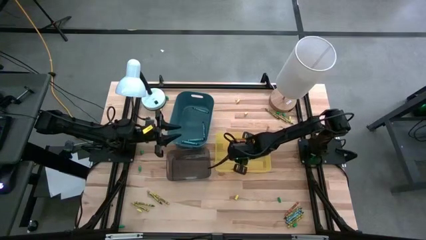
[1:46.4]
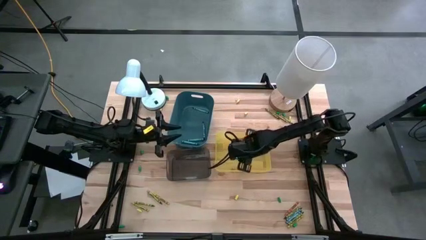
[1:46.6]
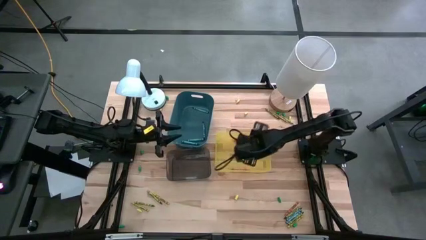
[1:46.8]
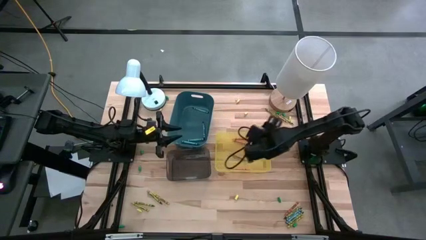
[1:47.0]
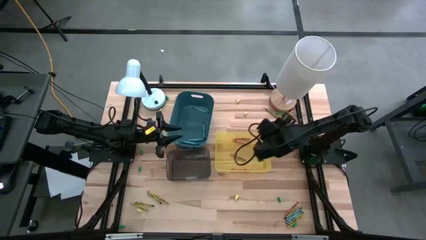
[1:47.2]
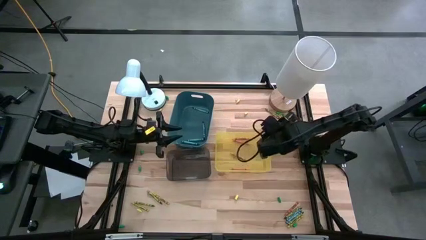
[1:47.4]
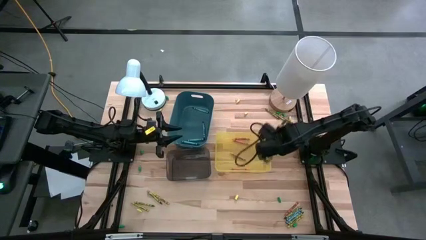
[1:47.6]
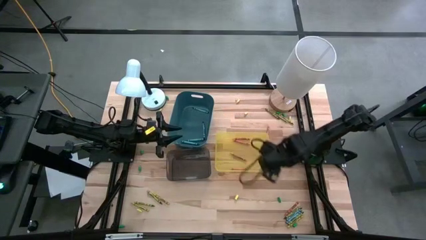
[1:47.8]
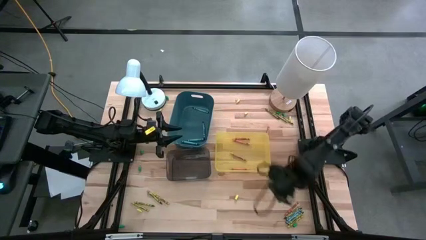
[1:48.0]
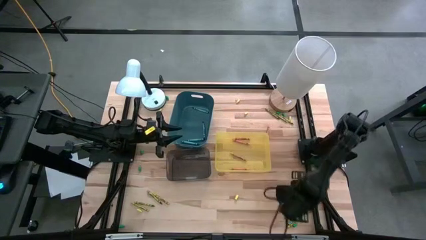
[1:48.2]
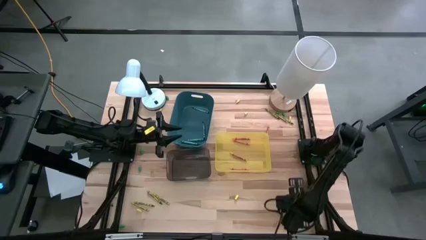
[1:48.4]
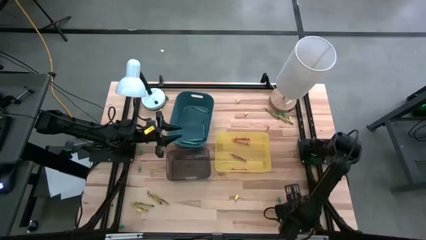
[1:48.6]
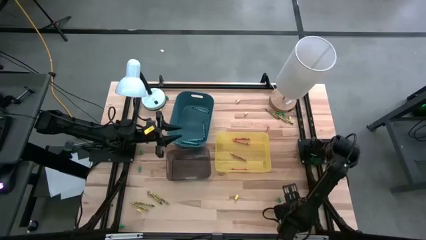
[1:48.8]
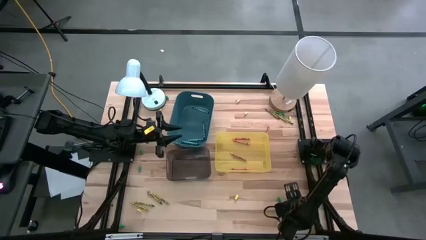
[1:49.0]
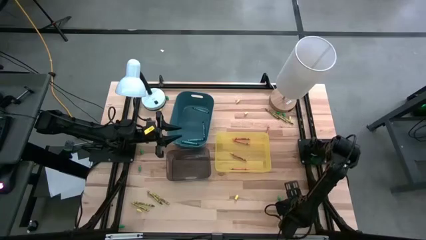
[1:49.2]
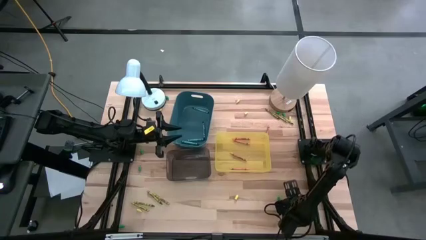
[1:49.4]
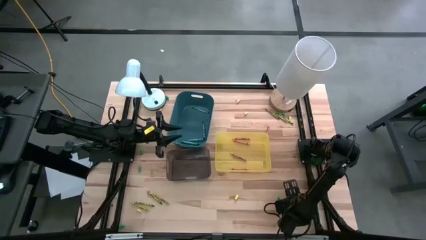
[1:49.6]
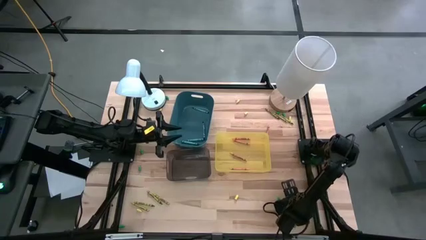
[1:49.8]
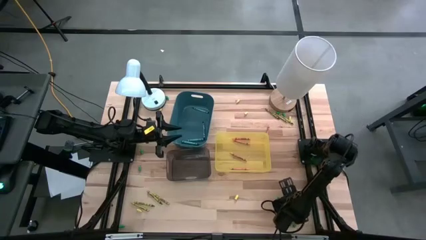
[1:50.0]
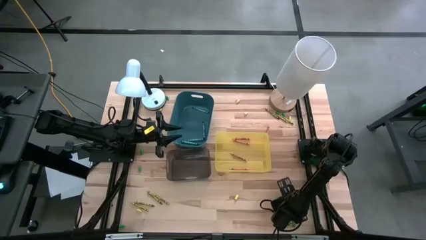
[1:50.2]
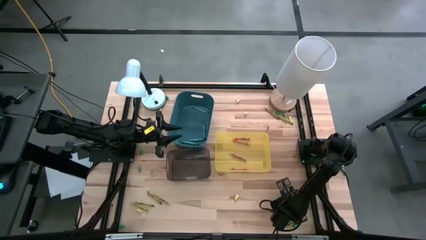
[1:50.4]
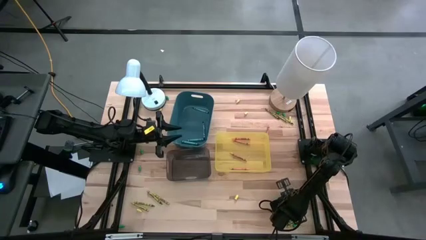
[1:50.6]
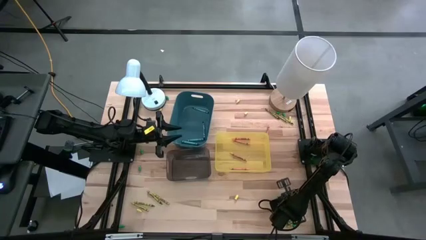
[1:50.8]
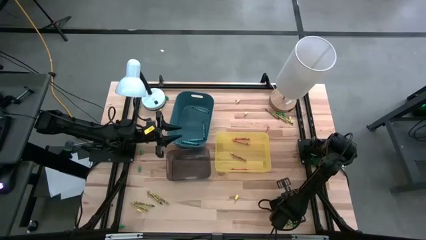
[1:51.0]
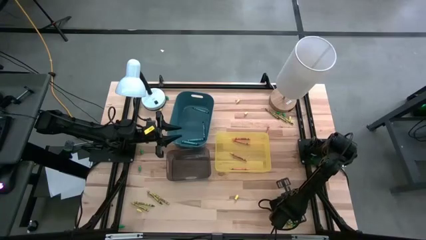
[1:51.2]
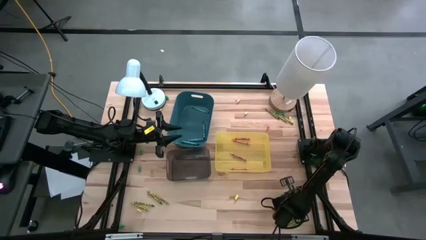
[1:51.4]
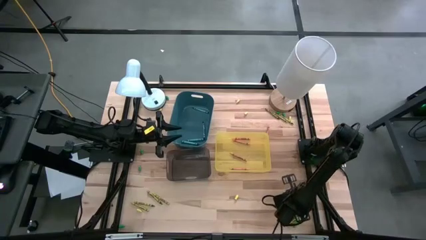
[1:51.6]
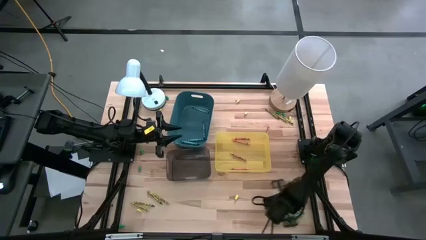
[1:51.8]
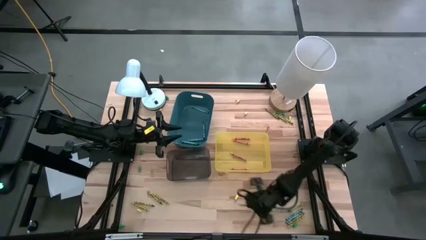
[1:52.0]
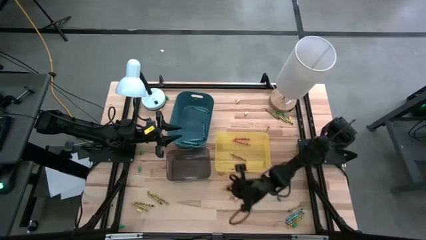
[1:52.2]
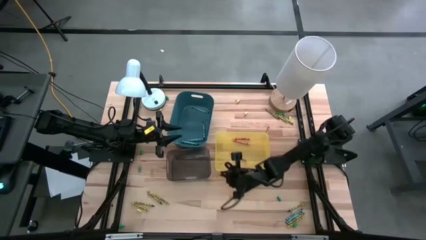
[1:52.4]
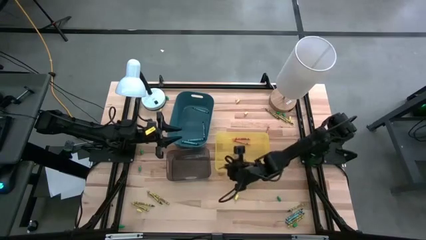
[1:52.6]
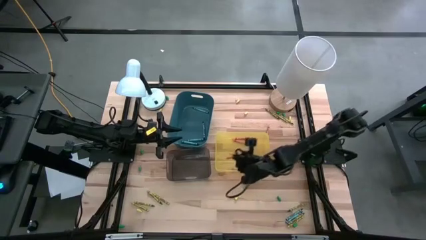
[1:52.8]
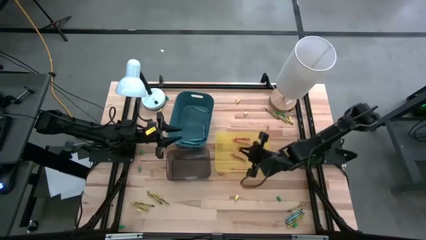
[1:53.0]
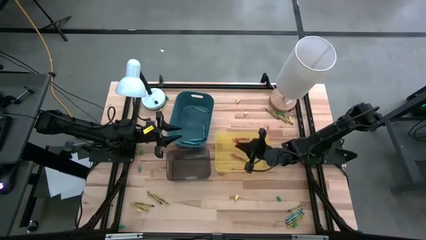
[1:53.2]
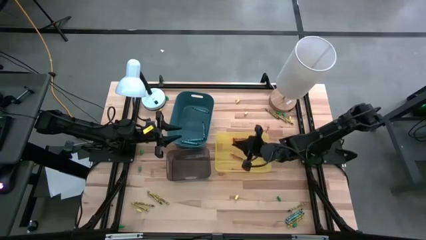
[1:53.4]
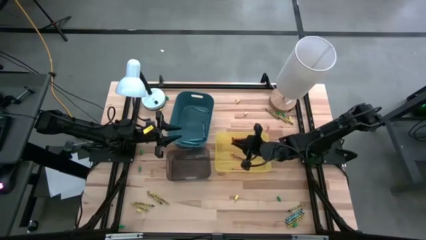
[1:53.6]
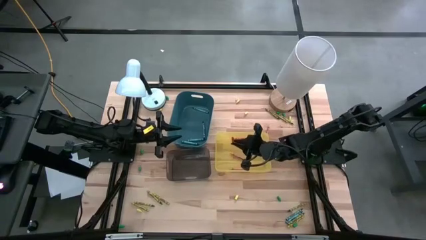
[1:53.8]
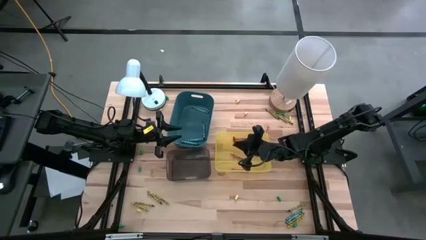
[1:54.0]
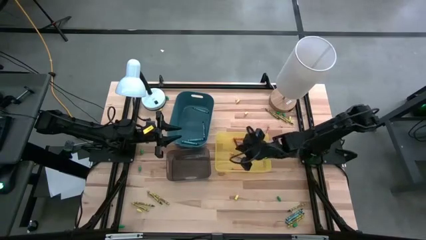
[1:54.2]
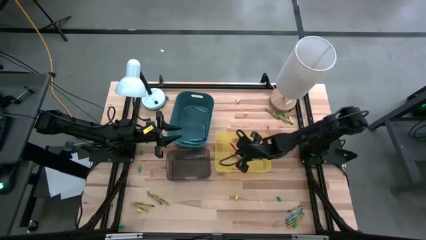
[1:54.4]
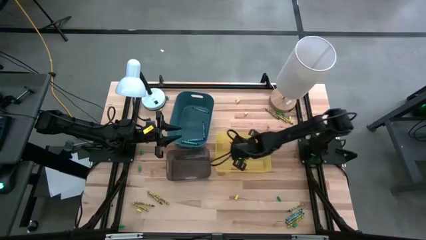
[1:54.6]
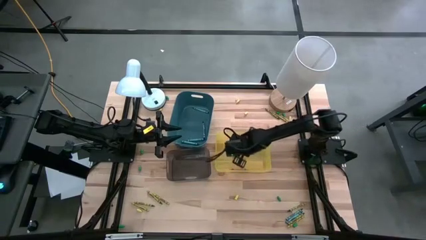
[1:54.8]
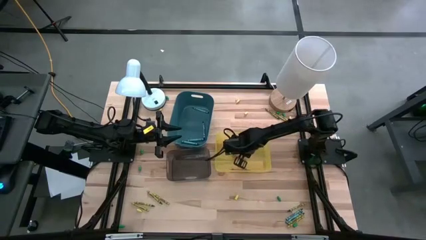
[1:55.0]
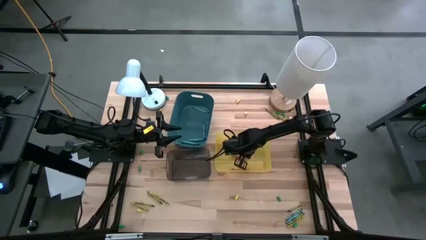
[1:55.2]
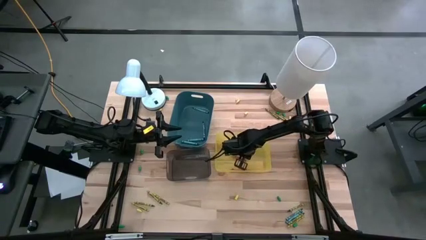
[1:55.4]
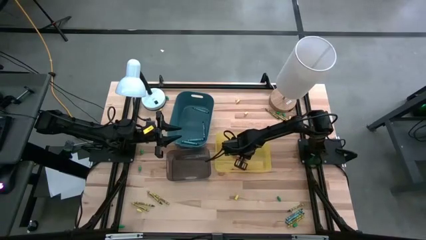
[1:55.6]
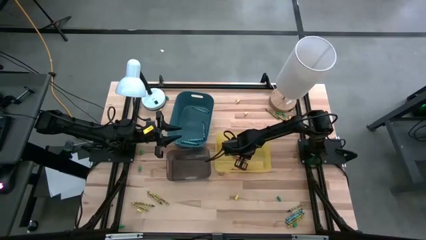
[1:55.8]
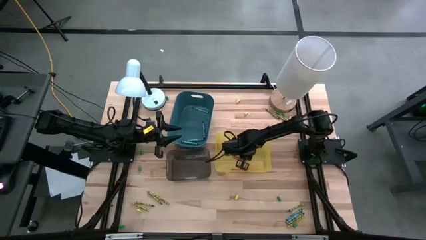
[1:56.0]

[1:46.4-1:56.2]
Task: Sort crayons
Put the orange crayon into the yellow bin

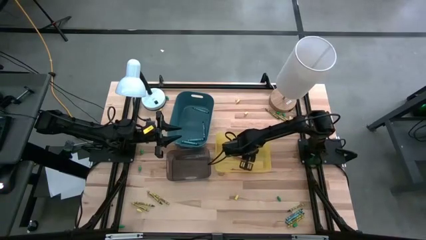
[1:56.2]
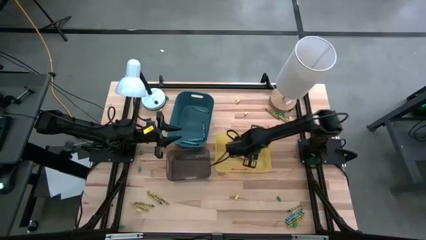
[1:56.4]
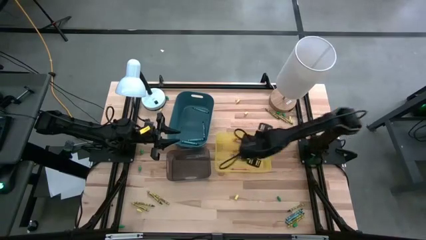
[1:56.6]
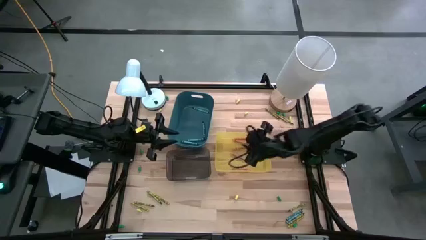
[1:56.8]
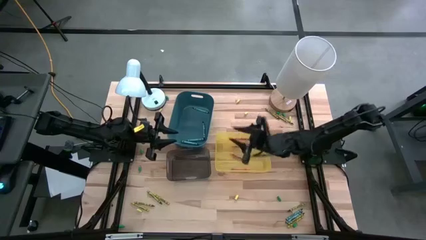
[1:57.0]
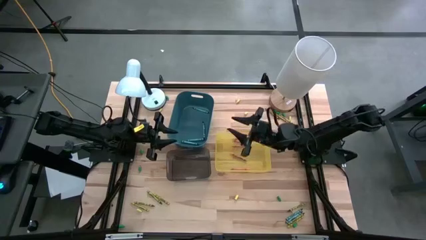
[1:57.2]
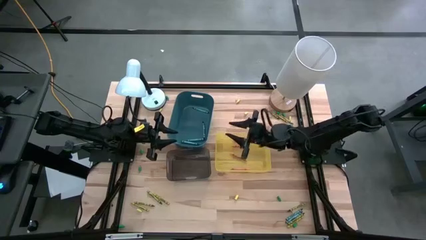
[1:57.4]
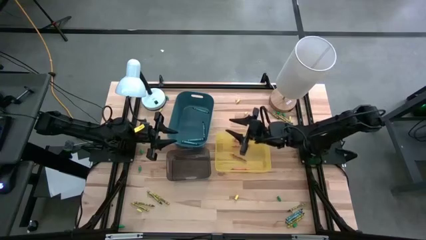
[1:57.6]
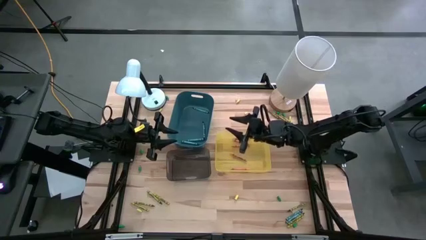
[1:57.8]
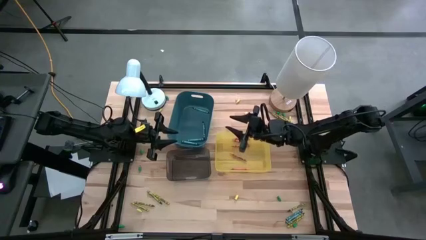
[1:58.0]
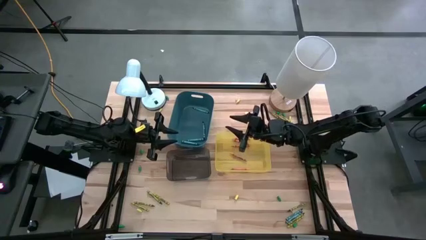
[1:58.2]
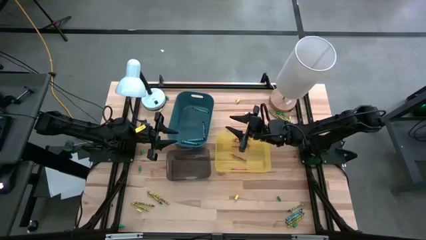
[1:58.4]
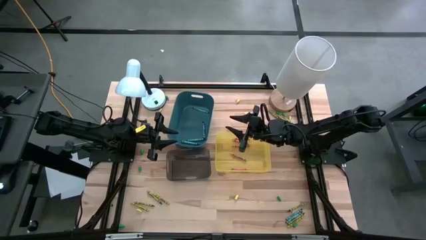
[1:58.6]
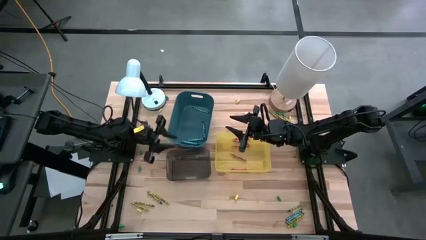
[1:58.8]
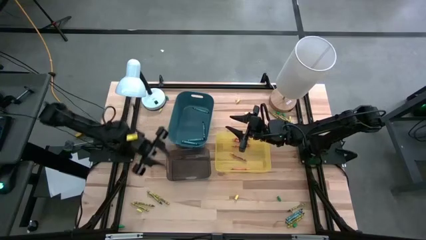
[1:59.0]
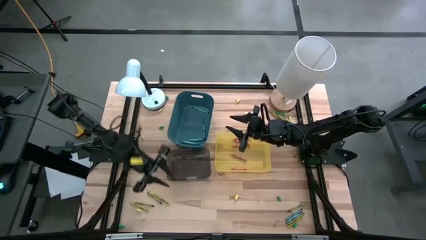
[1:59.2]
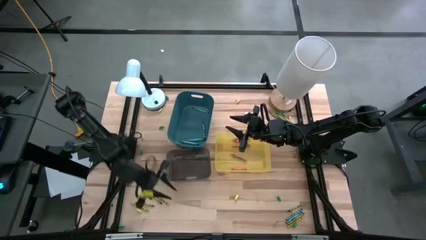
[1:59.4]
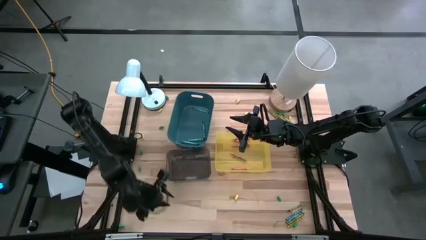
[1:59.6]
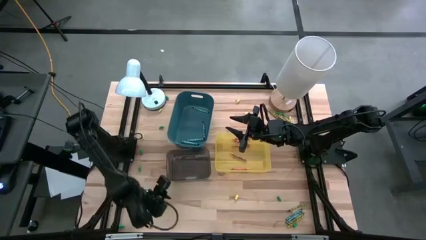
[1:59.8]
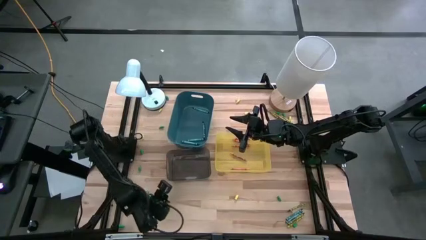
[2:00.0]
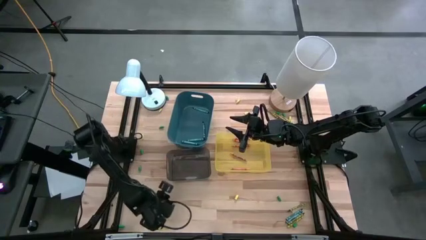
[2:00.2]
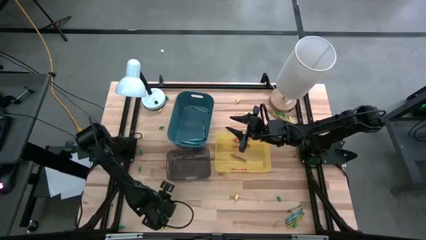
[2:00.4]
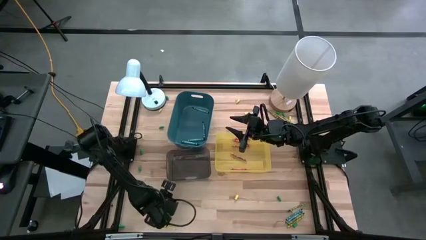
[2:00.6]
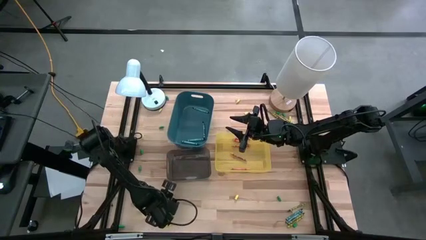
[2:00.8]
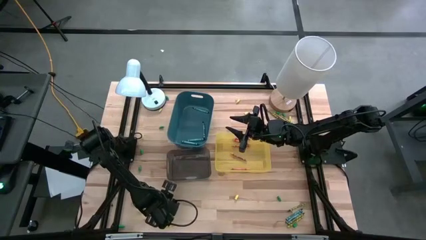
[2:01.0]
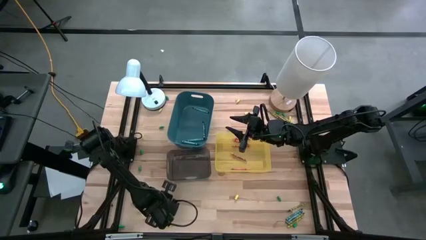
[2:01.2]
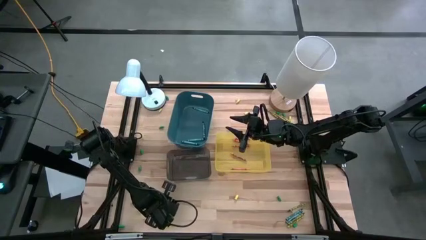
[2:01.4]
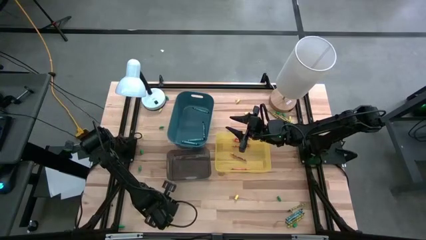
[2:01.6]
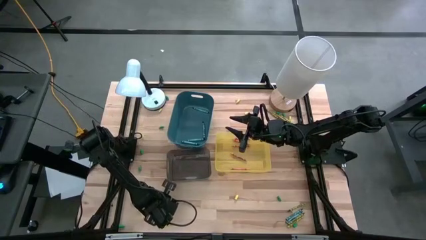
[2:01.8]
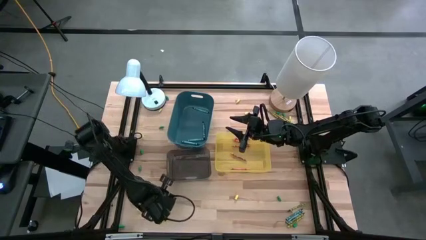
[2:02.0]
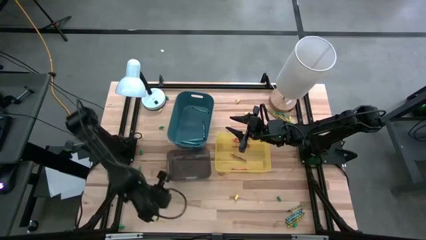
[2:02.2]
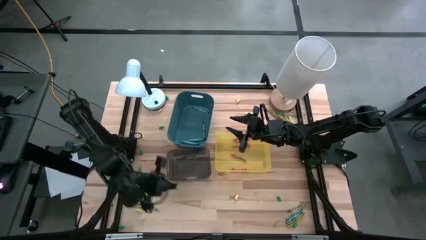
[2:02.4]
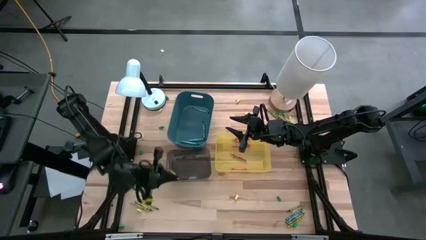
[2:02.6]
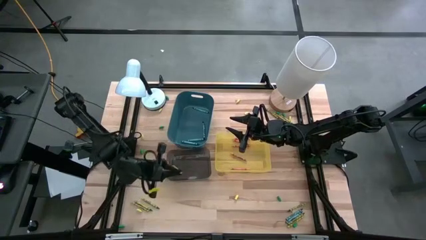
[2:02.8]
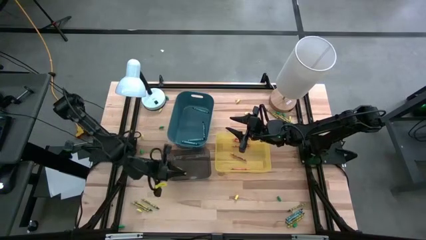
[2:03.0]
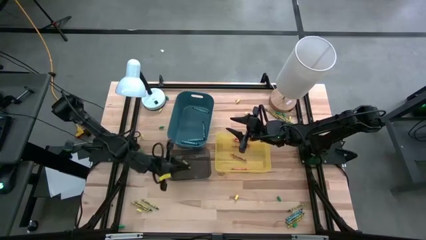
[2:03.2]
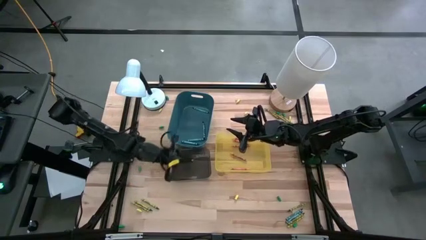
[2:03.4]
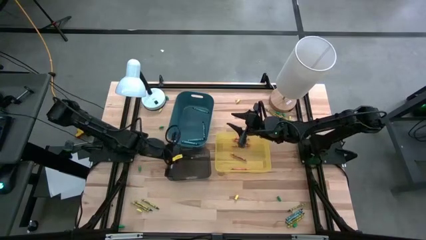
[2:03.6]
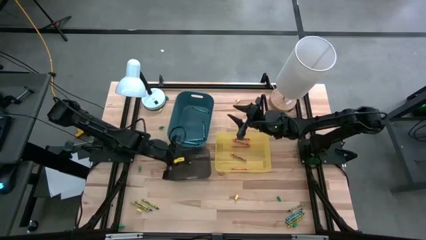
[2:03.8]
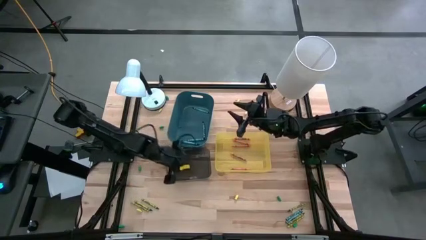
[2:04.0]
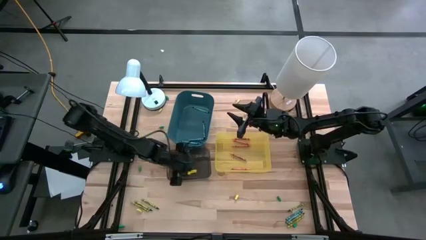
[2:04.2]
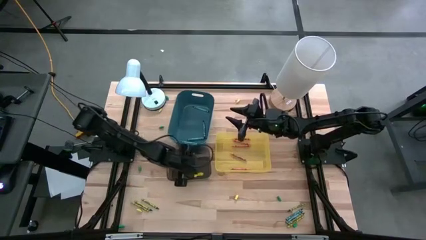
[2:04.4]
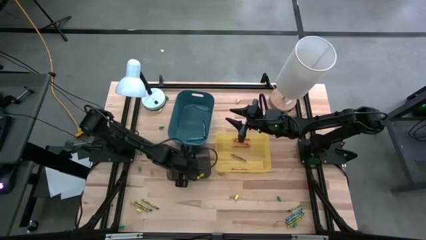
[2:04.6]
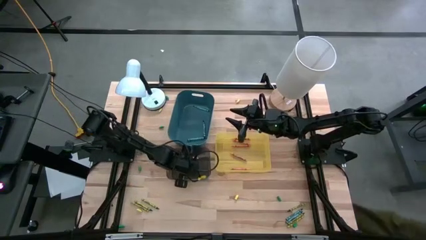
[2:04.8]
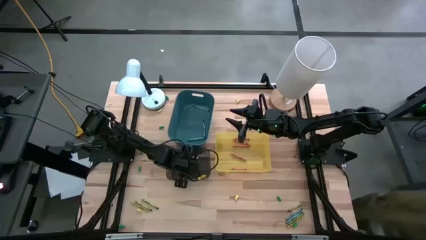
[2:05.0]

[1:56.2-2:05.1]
Put the light green crayon into the black bin
